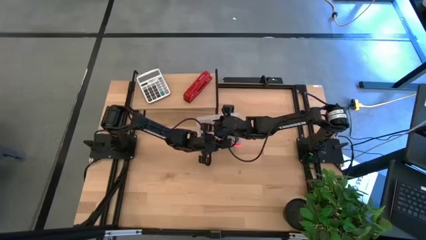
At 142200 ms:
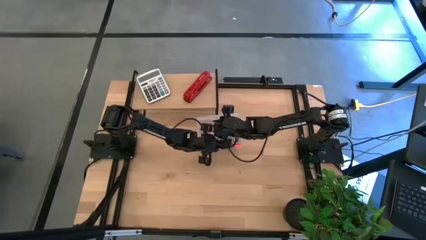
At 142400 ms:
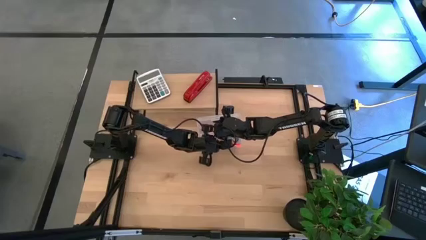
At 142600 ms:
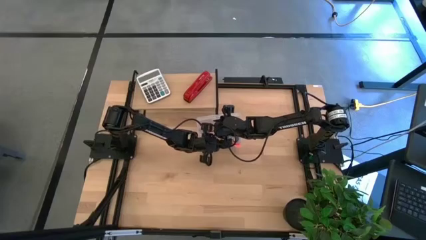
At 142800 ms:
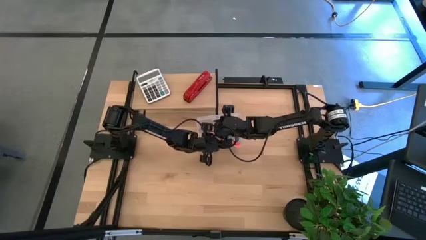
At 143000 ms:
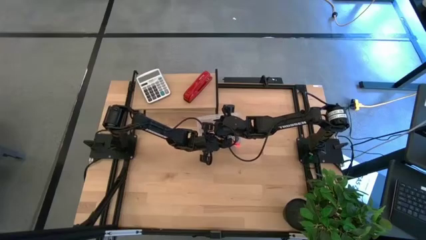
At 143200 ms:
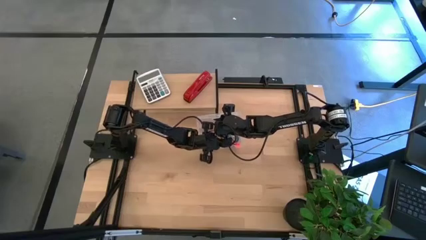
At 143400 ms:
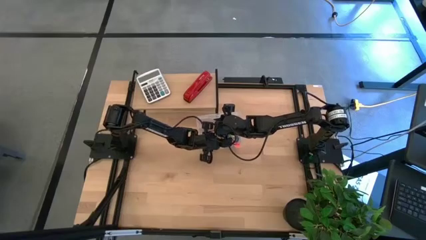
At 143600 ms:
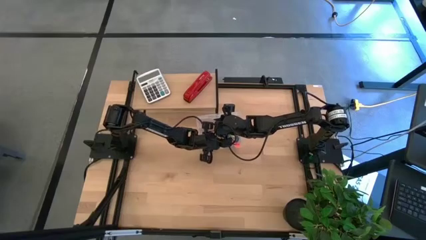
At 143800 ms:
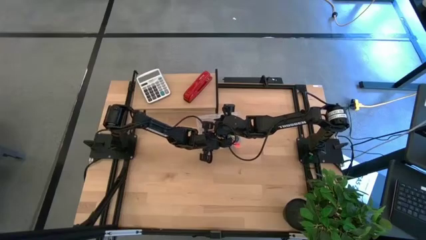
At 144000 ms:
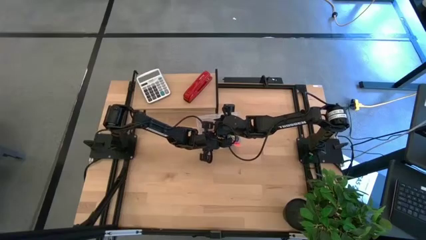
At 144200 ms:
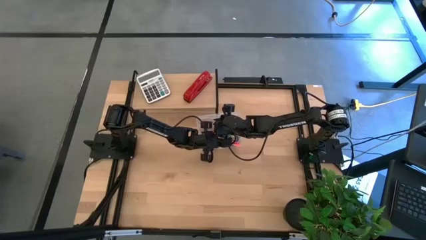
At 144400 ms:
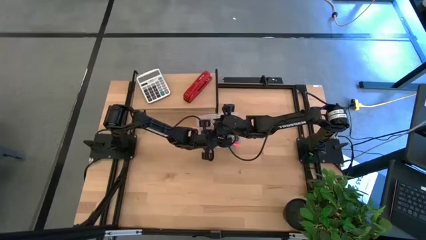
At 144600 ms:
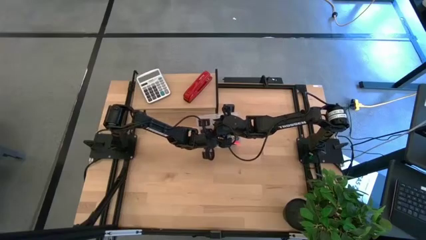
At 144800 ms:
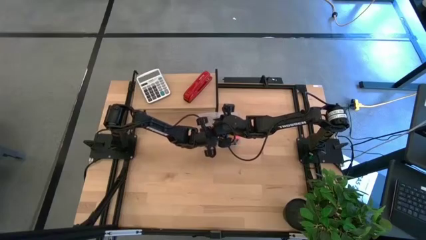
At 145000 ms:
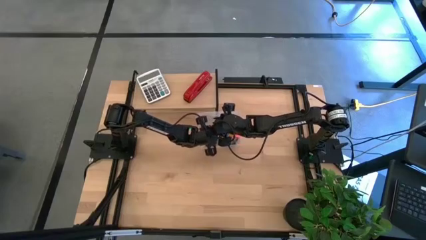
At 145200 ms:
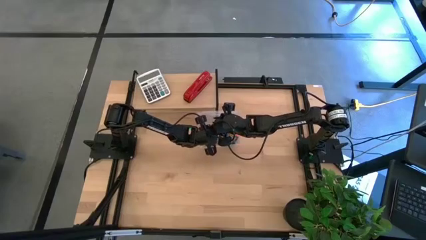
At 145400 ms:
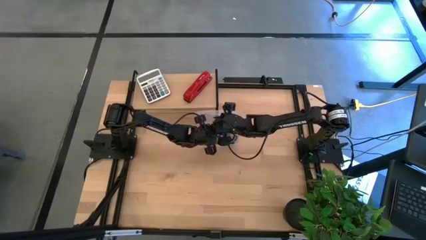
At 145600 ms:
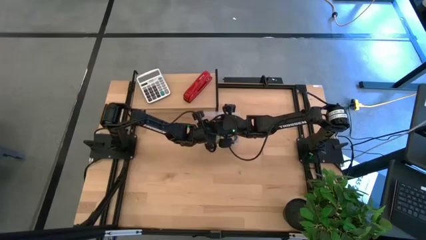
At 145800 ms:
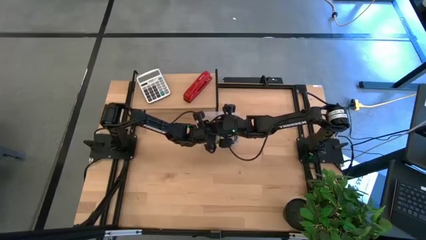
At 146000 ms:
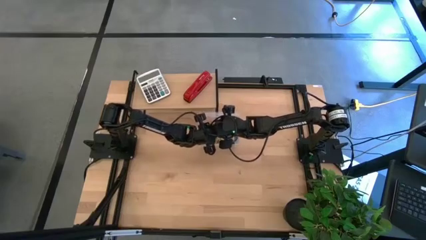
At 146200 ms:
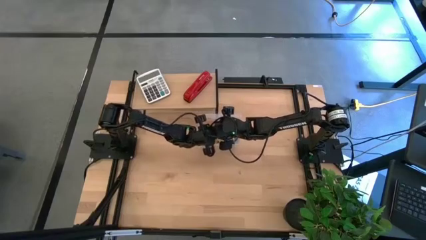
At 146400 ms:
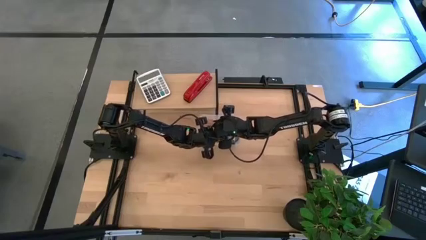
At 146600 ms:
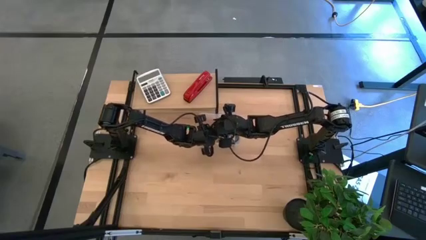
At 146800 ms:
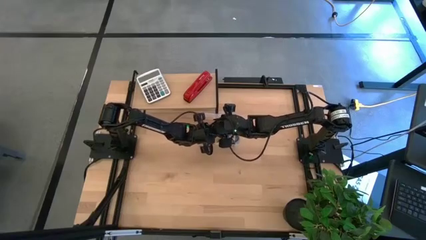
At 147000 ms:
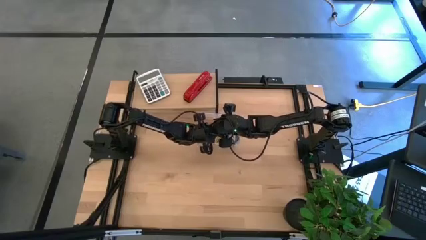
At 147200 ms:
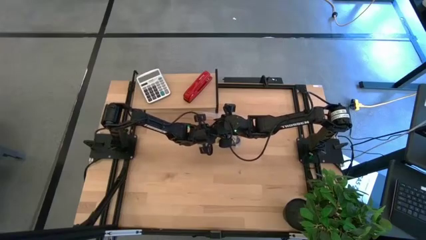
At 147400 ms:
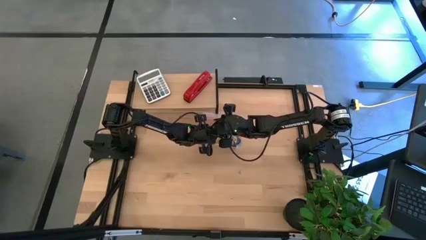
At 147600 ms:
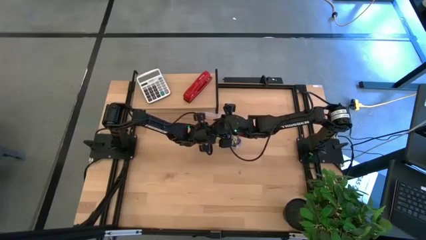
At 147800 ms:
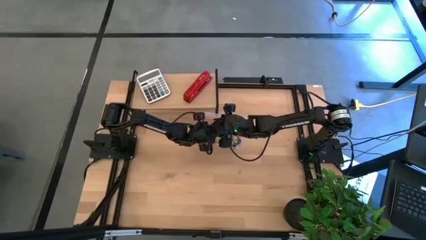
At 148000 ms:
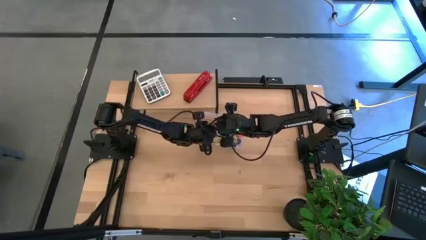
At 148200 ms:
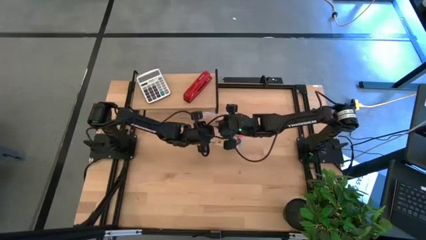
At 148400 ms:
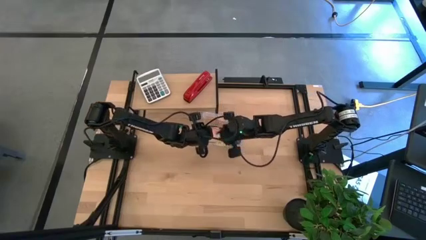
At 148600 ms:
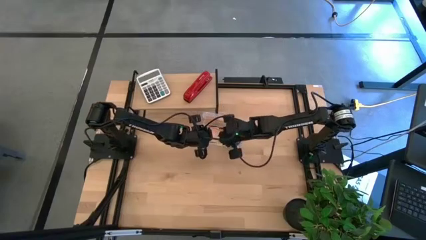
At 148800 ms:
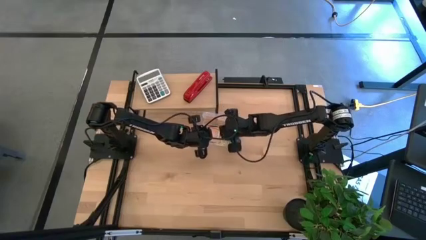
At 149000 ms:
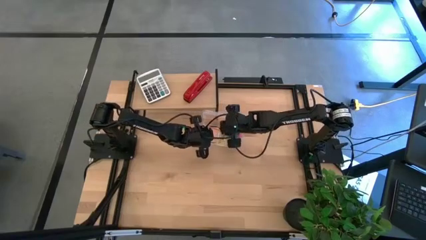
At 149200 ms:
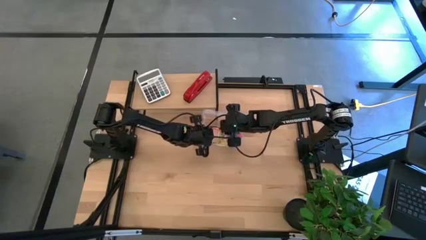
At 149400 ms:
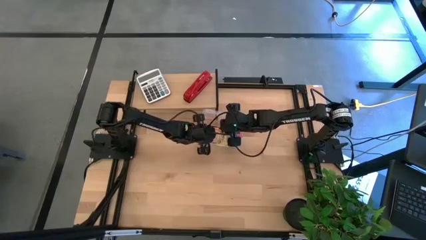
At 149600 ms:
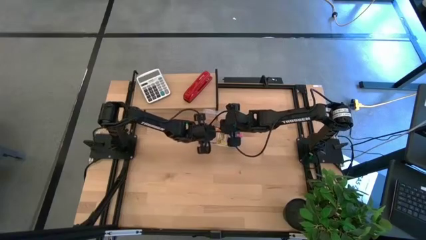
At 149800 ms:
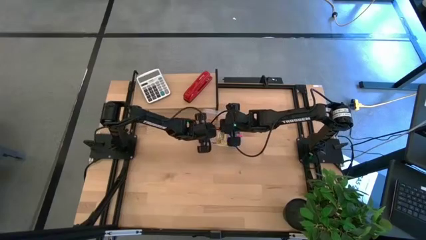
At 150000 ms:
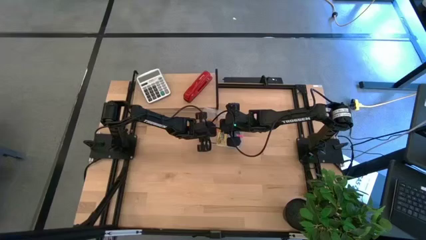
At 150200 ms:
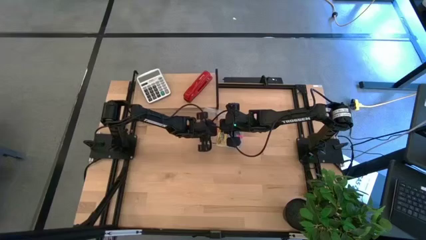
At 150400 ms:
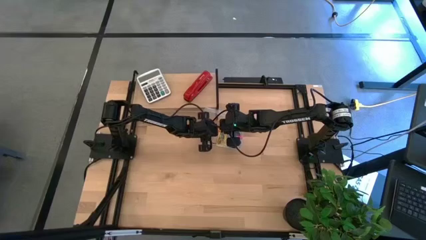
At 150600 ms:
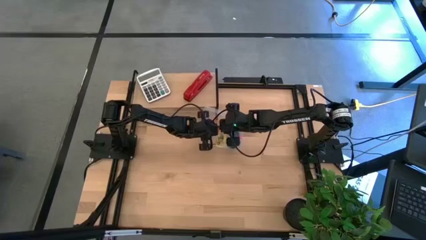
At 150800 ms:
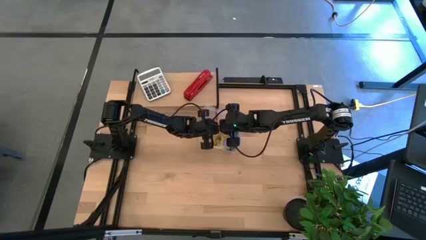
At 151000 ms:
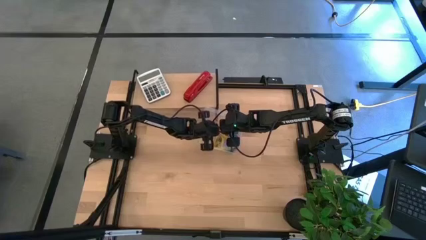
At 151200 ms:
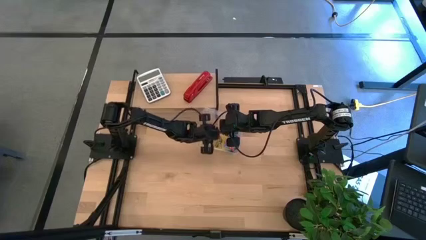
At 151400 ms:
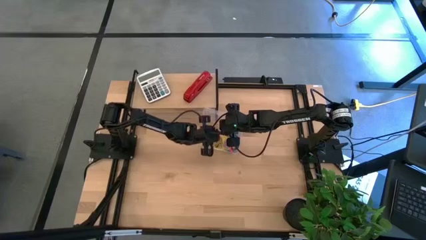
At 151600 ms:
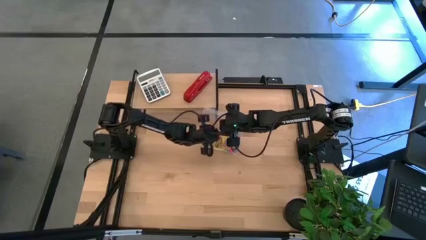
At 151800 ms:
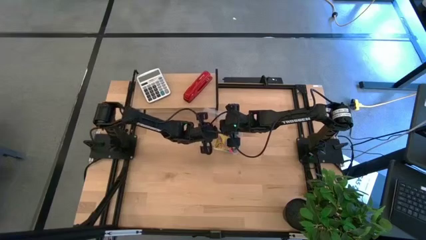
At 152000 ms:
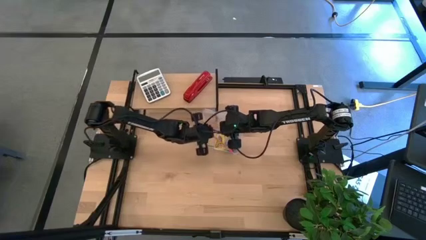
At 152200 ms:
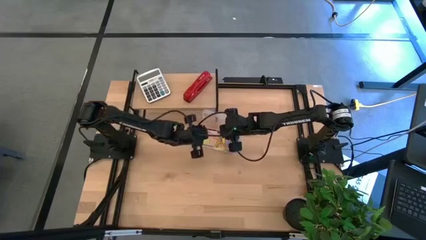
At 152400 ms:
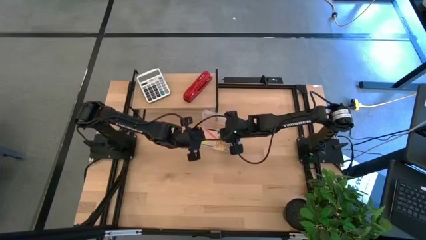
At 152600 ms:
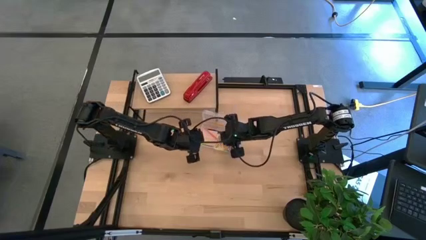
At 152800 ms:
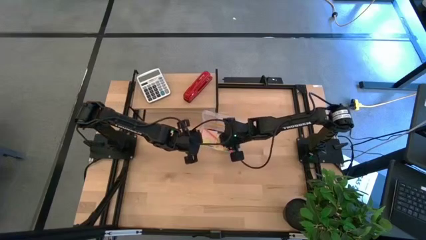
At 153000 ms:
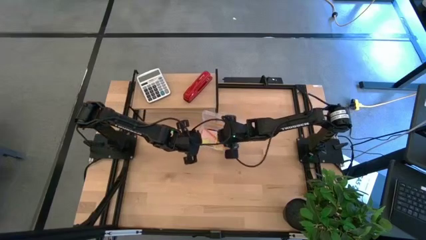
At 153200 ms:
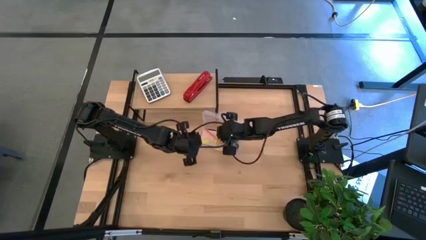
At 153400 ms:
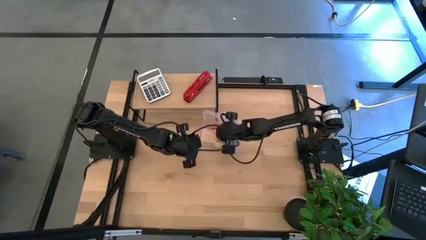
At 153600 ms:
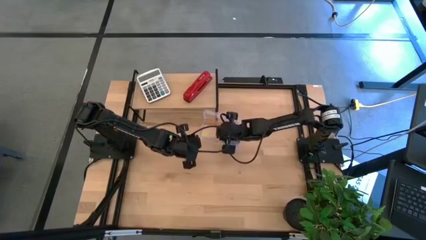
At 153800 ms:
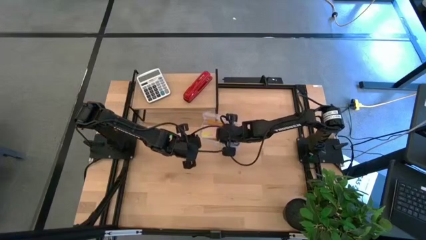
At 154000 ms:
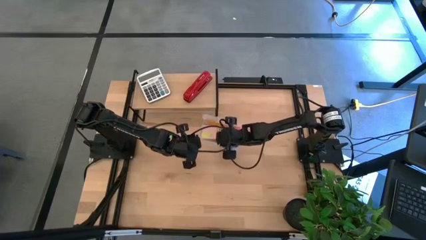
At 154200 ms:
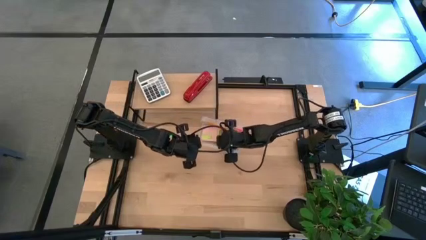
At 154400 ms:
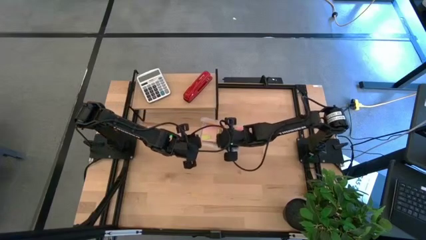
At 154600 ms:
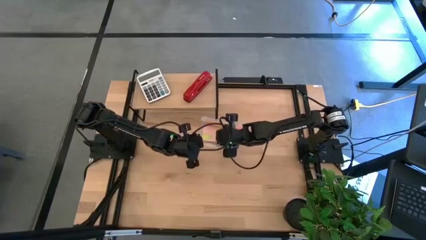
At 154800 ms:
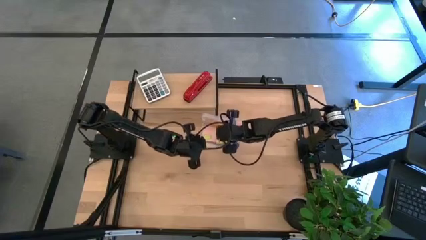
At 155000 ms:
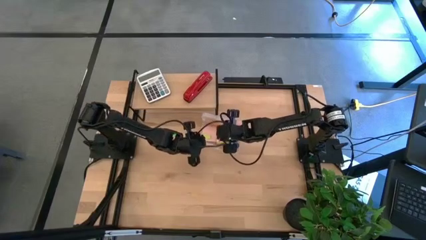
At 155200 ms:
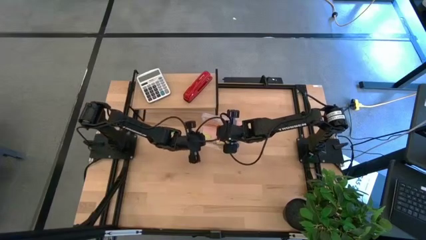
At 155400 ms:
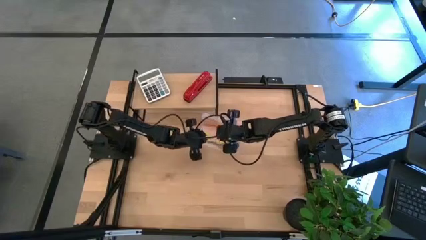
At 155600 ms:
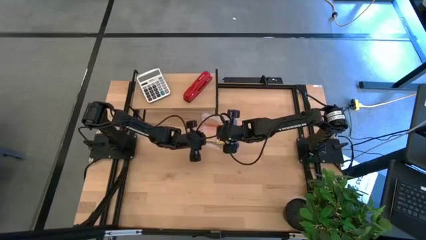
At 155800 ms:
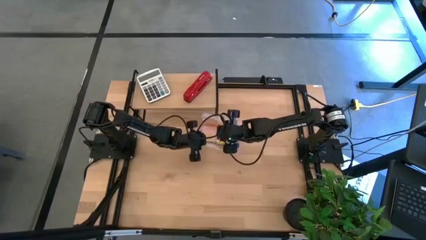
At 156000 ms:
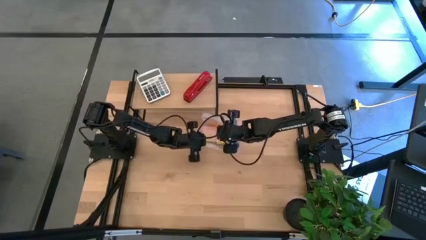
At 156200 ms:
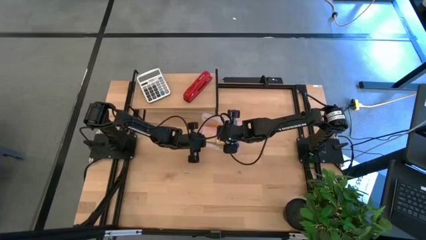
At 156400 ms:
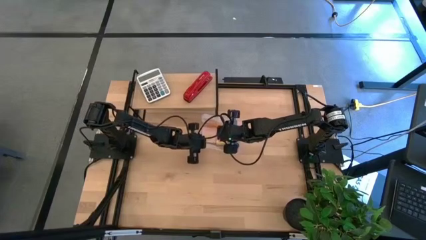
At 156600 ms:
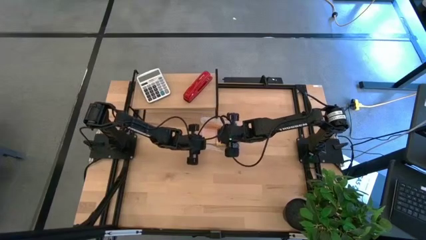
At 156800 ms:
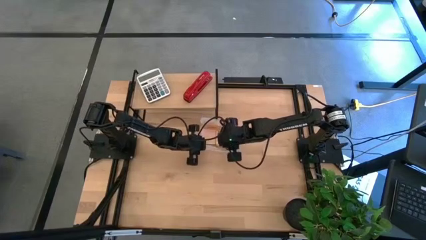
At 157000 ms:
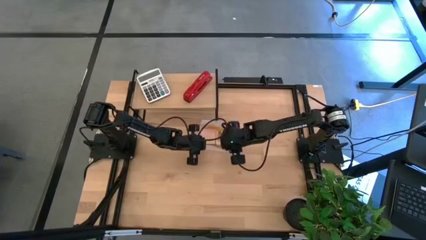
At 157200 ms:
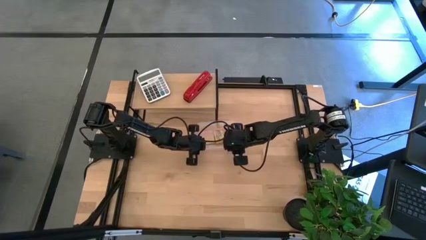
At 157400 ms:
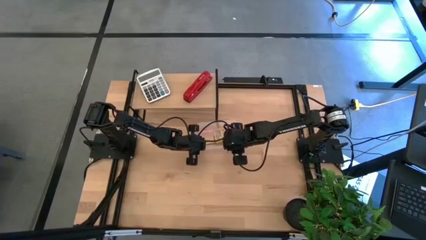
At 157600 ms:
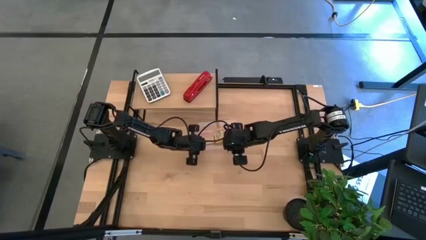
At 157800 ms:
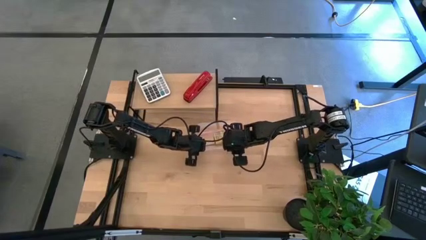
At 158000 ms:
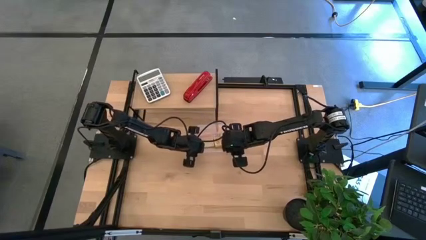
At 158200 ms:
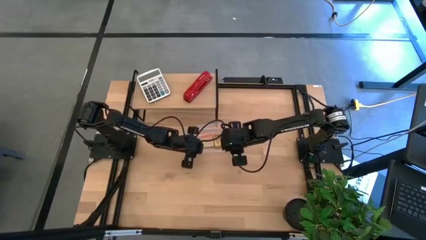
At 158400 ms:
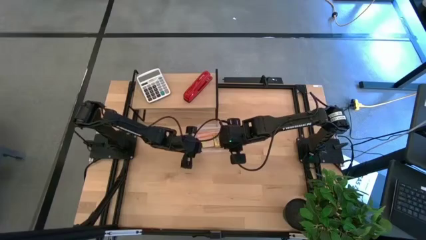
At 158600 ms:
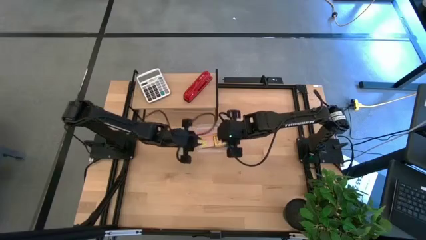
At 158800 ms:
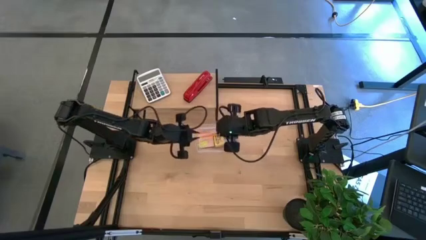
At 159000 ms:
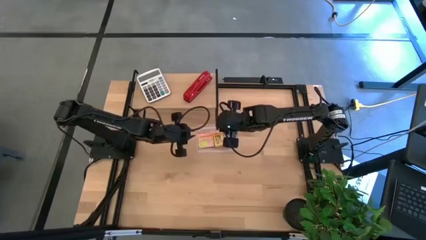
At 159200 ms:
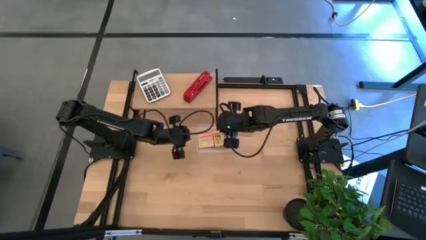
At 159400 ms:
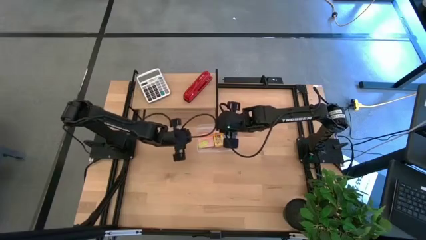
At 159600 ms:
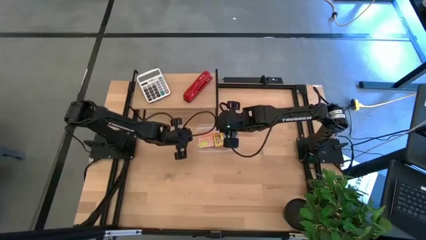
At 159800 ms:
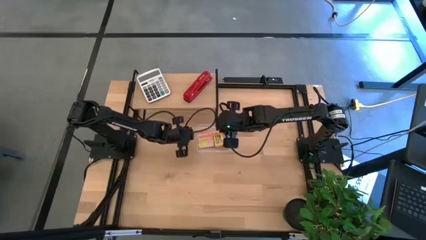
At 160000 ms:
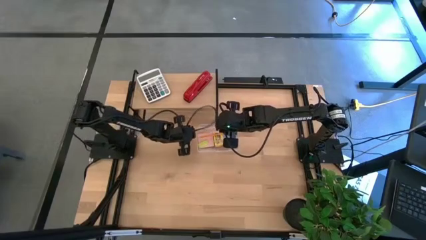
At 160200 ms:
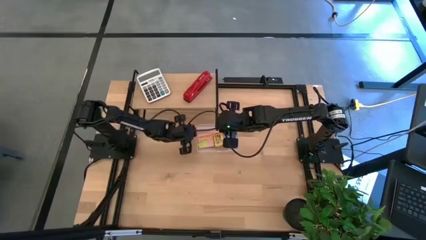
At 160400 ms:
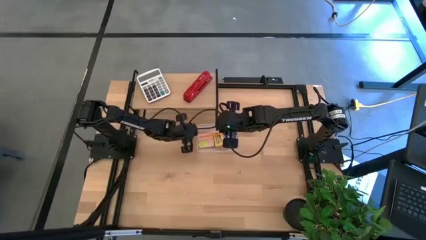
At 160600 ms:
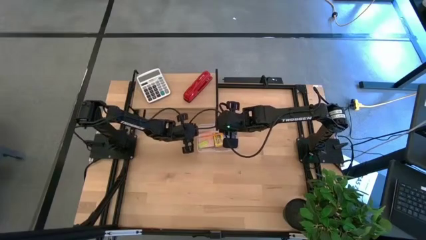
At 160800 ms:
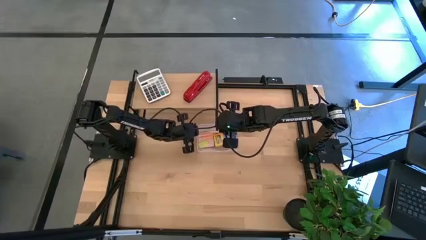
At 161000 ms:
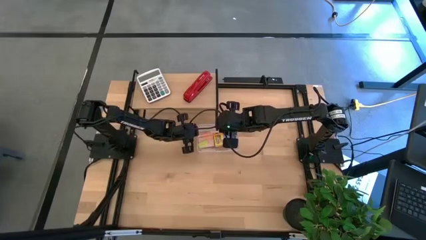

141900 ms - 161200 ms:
Task: Pack school essentials
Put the orange pencil into the supply box
